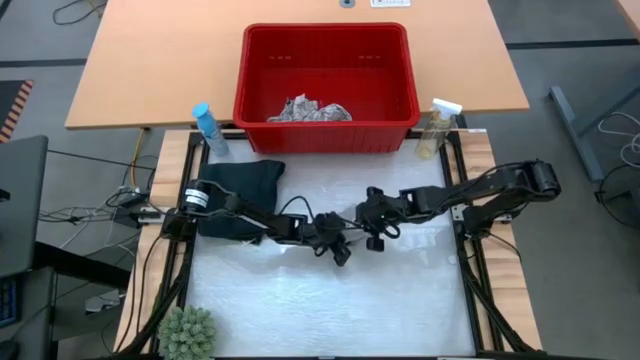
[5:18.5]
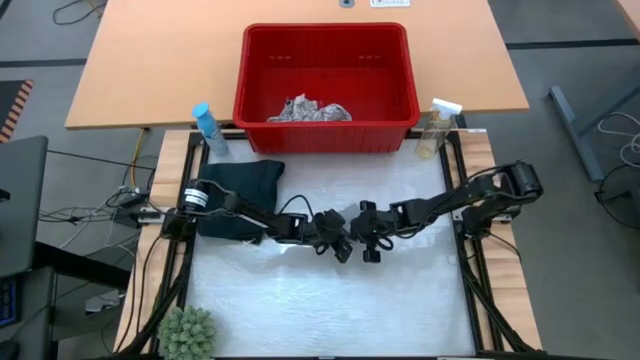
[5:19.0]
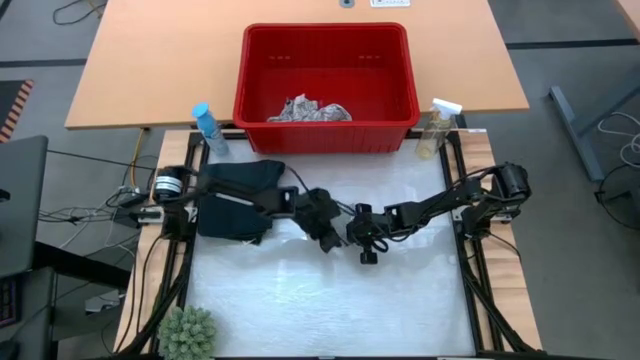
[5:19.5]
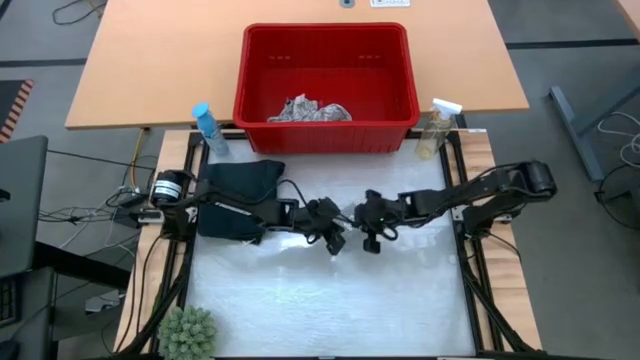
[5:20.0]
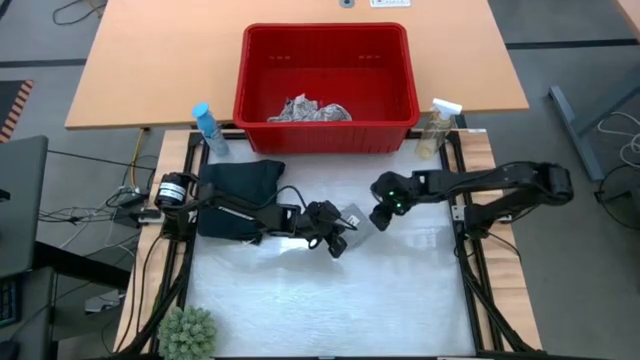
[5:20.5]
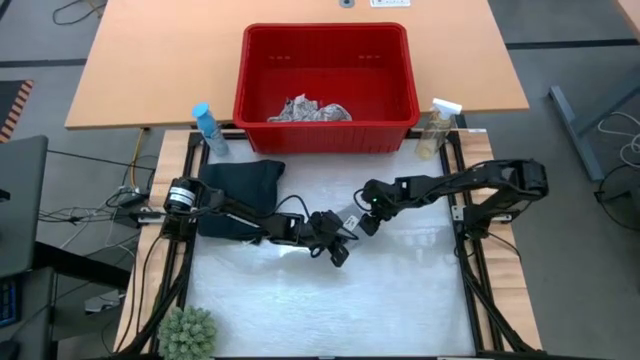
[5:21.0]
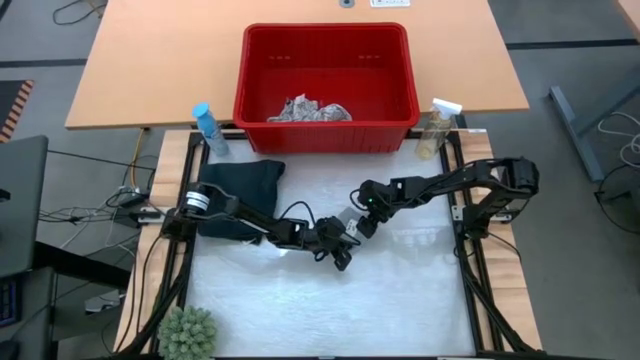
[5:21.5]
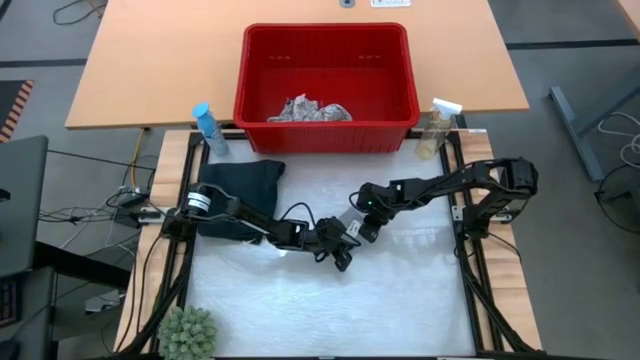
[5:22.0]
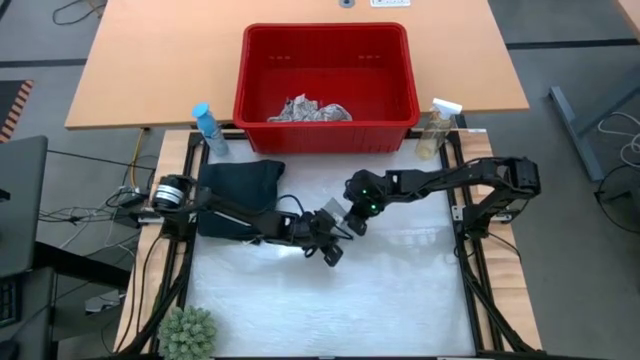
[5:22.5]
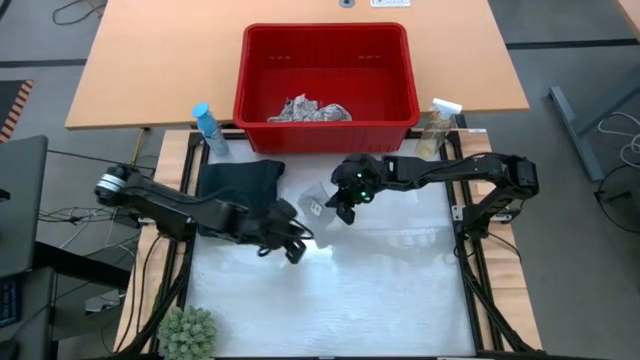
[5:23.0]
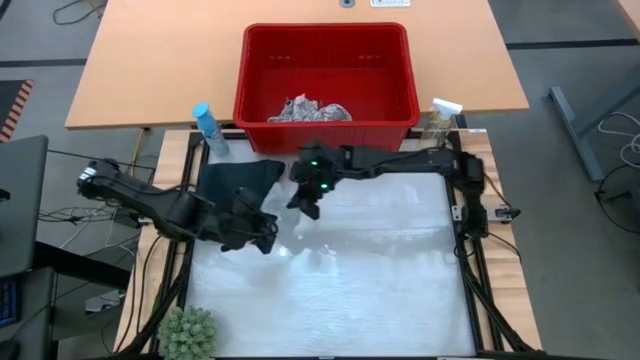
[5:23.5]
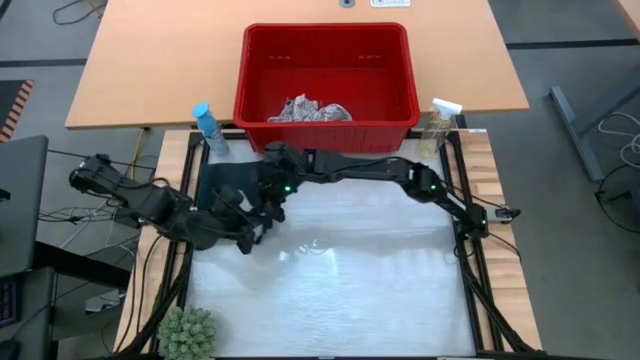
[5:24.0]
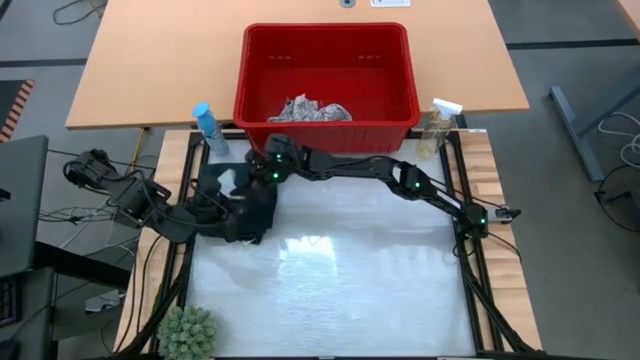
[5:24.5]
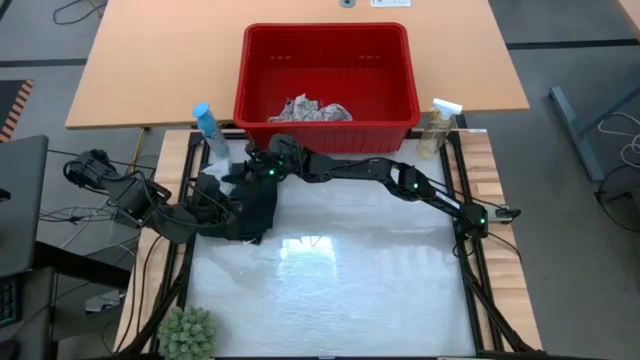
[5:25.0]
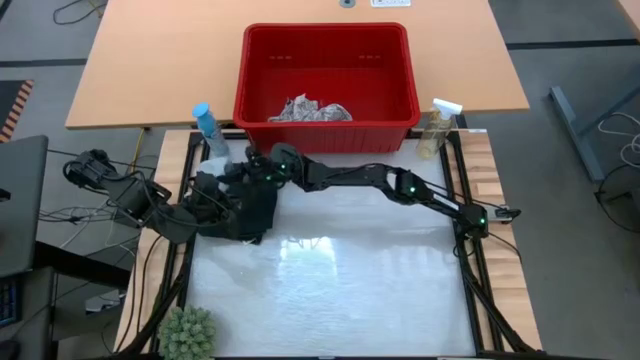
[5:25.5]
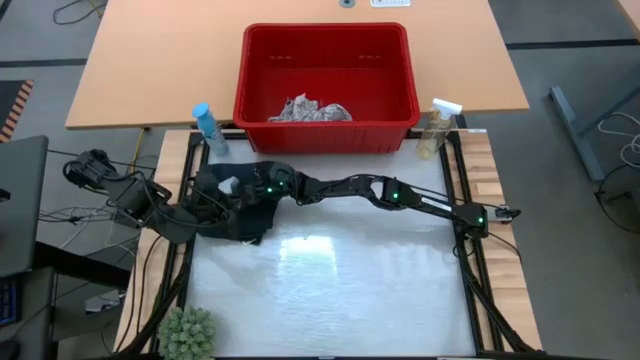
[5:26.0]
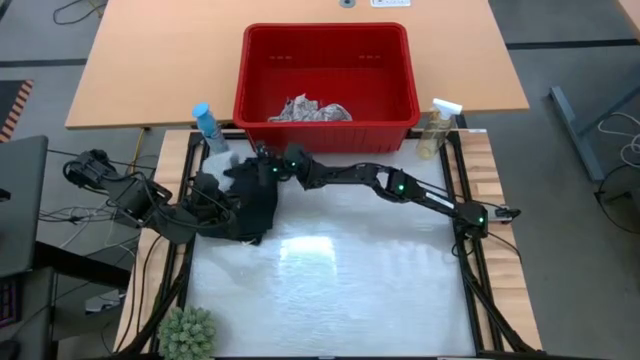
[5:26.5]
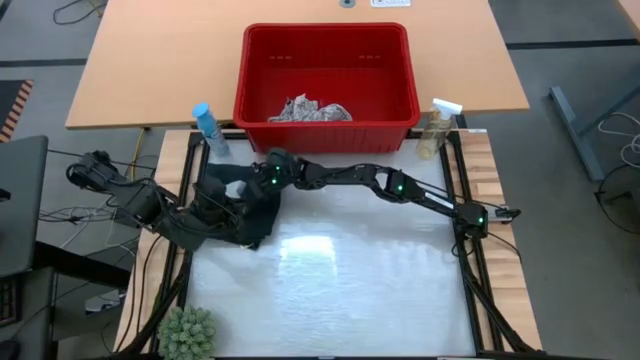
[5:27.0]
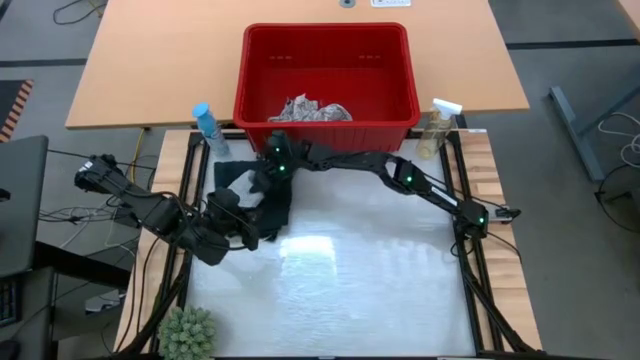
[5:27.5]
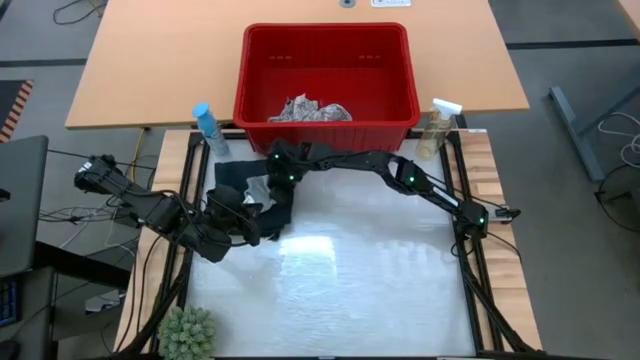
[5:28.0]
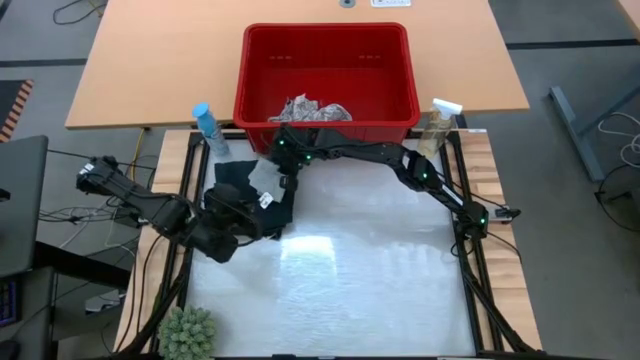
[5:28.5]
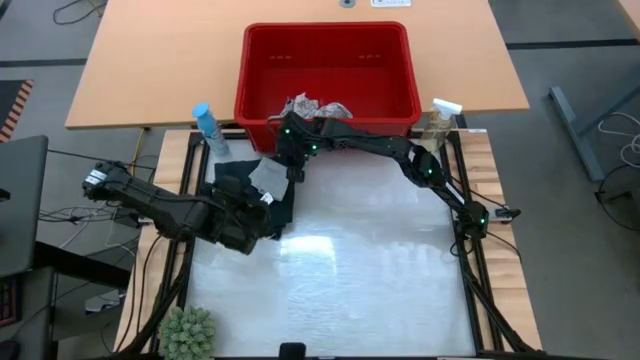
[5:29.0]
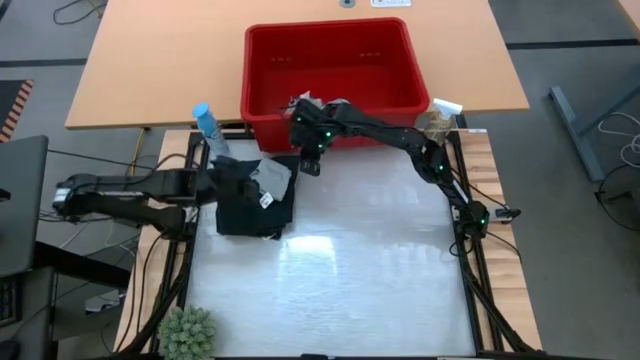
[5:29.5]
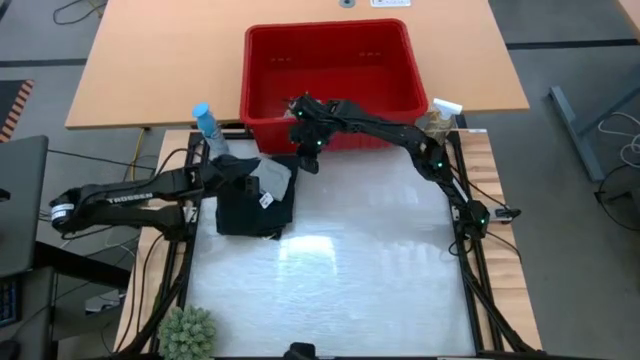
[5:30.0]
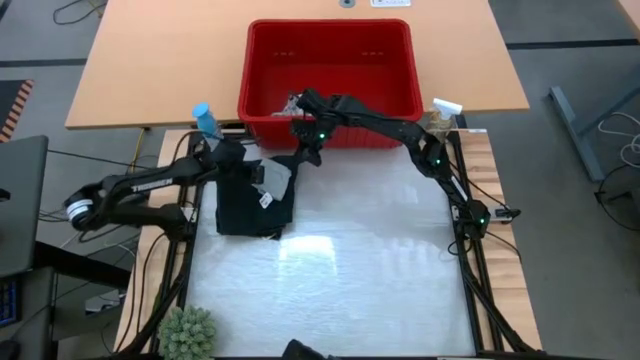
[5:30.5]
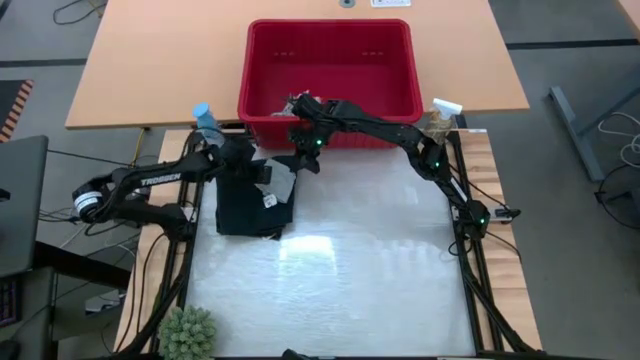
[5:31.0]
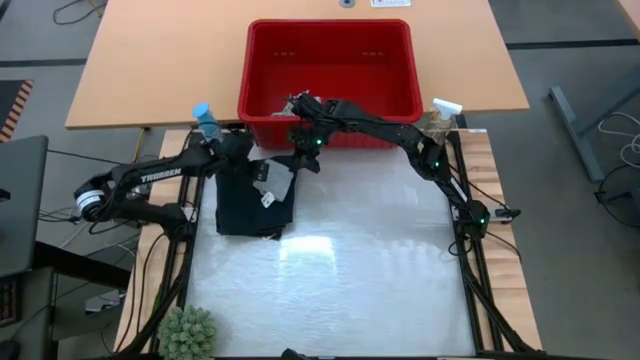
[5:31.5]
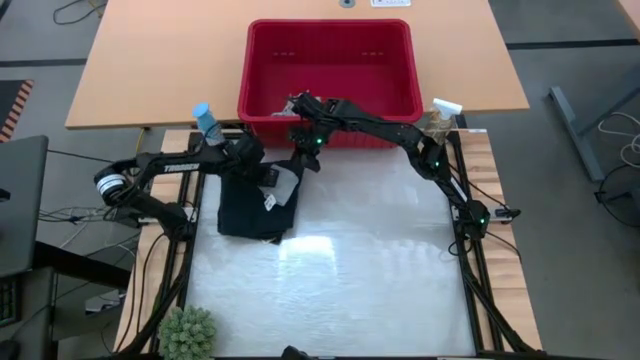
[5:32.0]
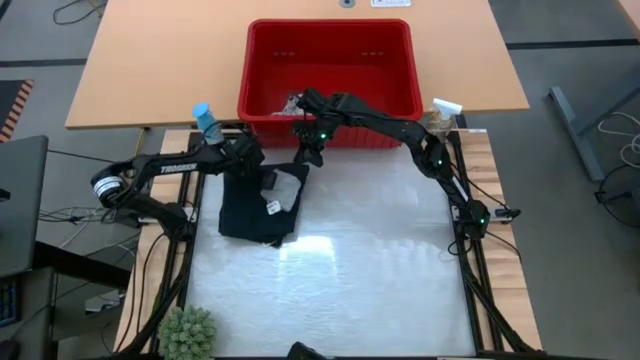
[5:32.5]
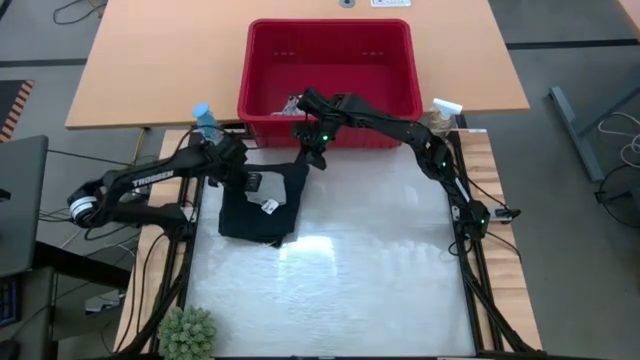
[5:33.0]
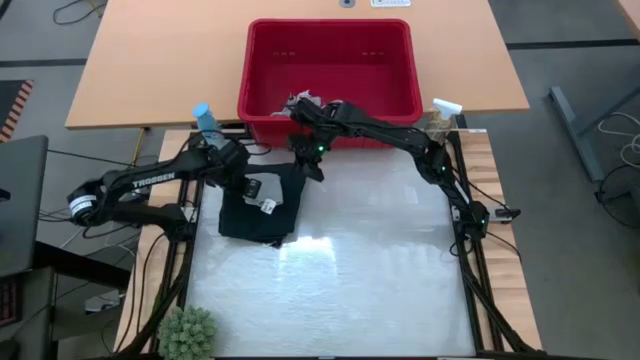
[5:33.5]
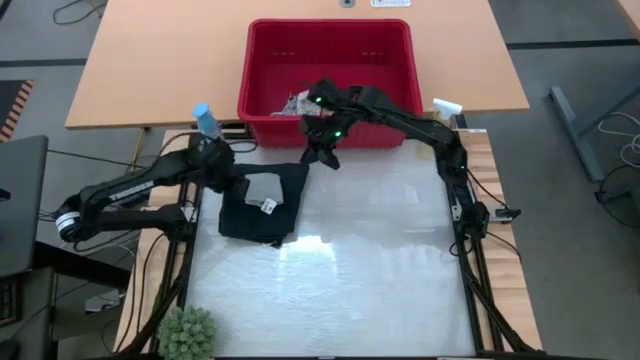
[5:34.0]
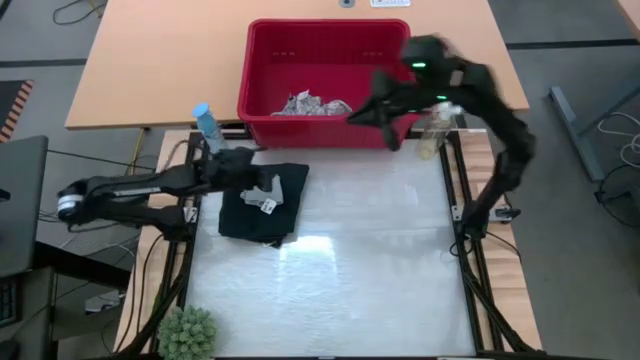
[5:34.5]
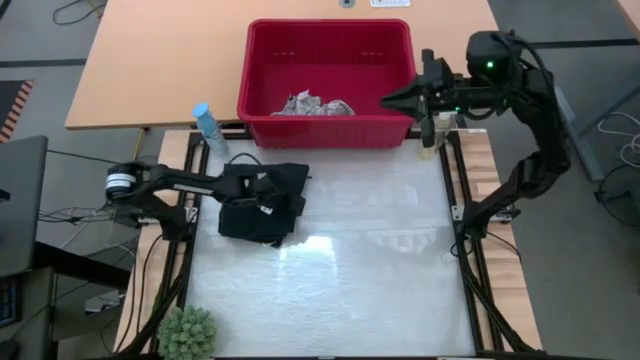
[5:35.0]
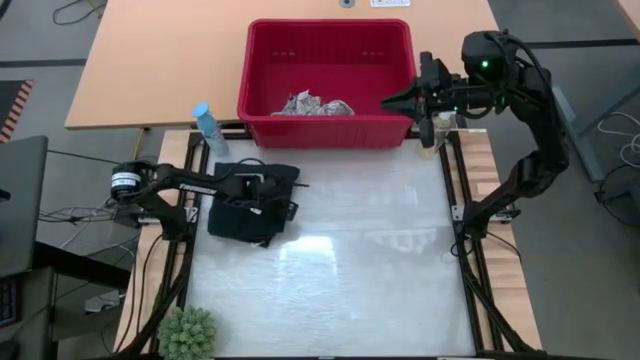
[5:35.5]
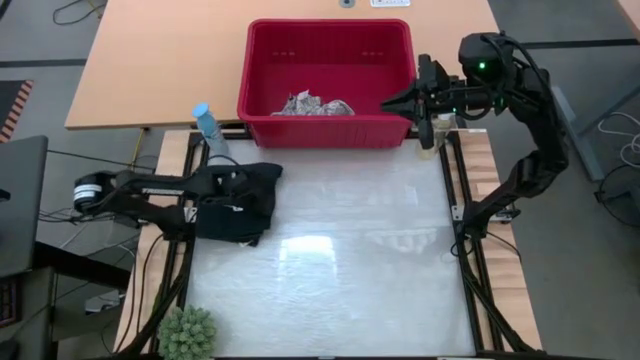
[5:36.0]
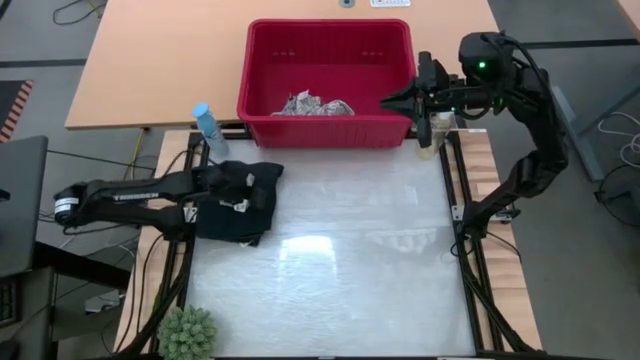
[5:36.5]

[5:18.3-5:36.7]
Task: Fold Laundry from Bin
Stack the gray shorts on top of the blue jeans
